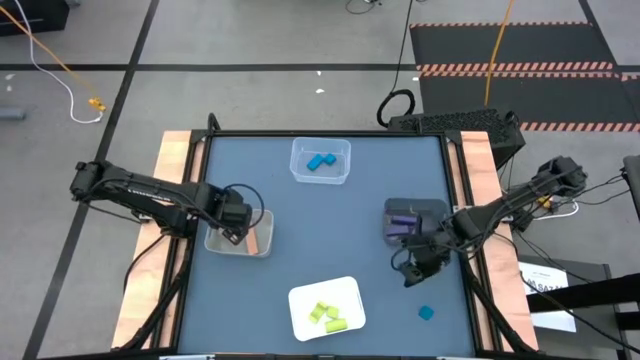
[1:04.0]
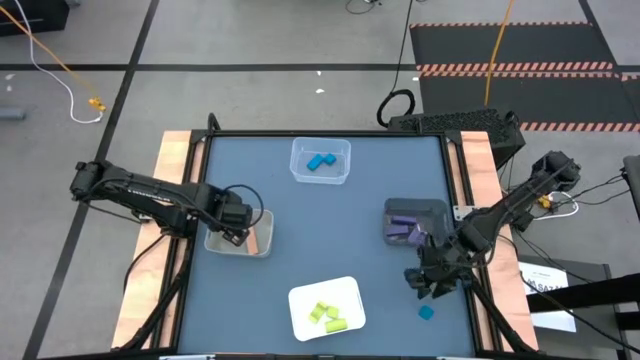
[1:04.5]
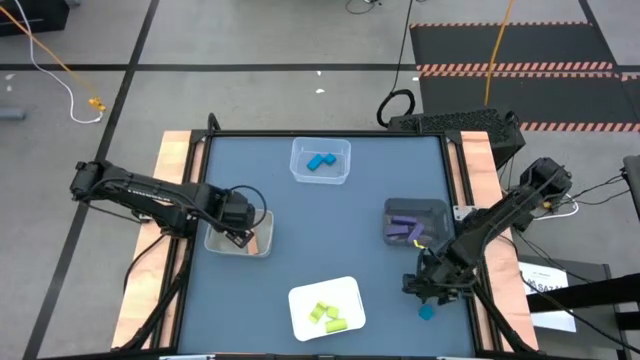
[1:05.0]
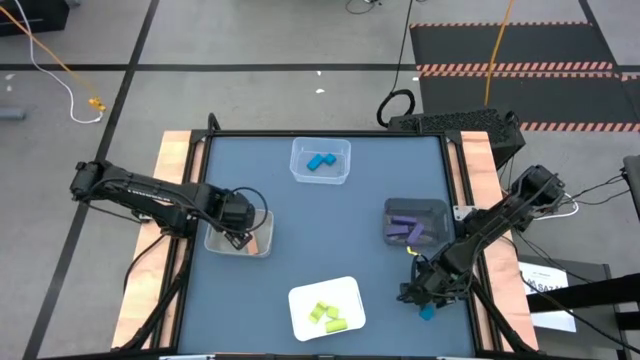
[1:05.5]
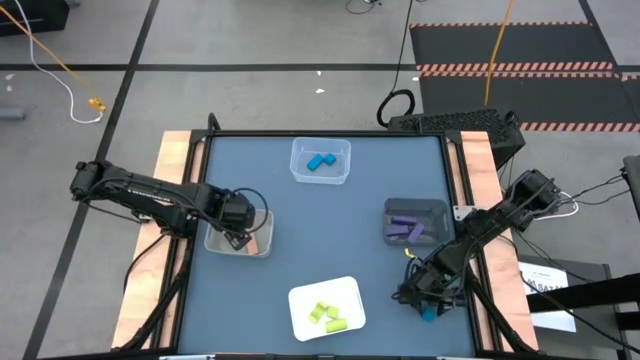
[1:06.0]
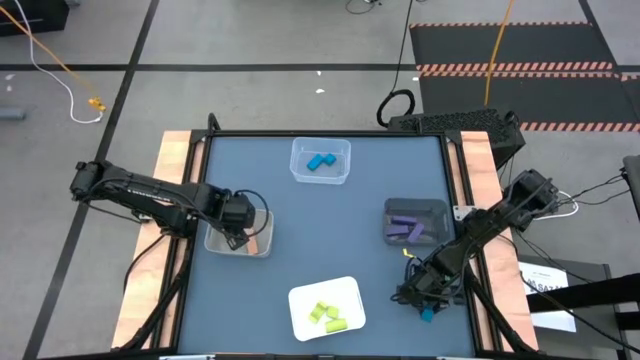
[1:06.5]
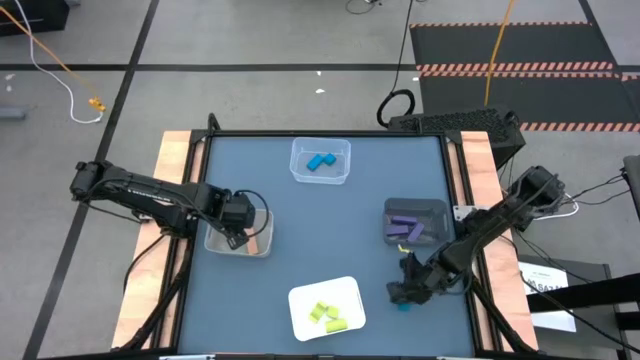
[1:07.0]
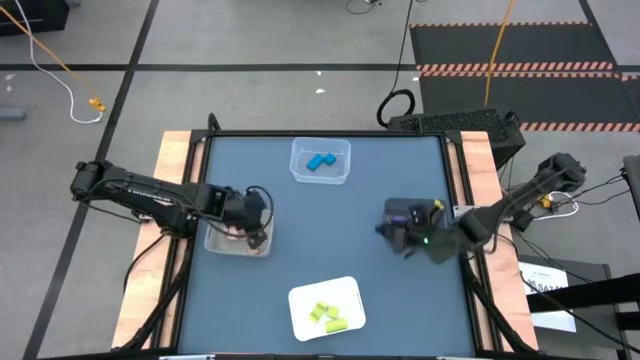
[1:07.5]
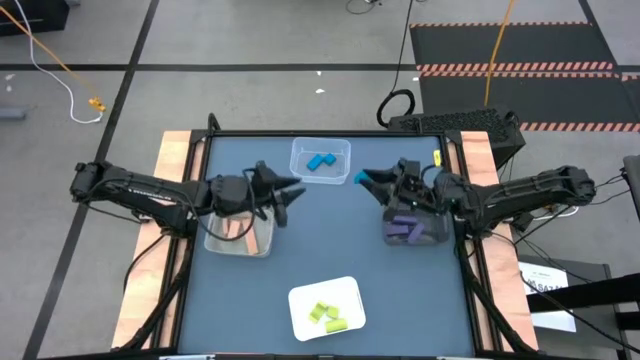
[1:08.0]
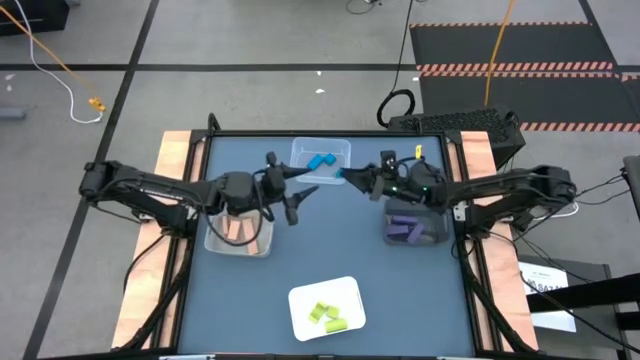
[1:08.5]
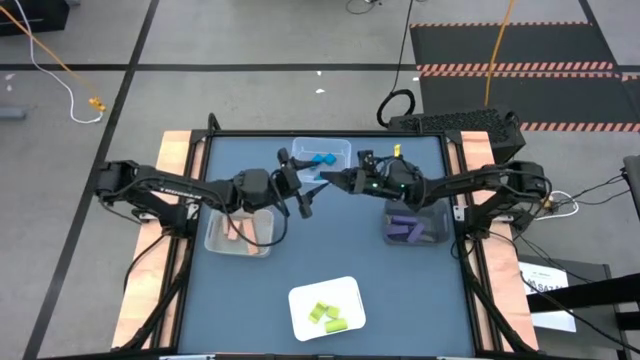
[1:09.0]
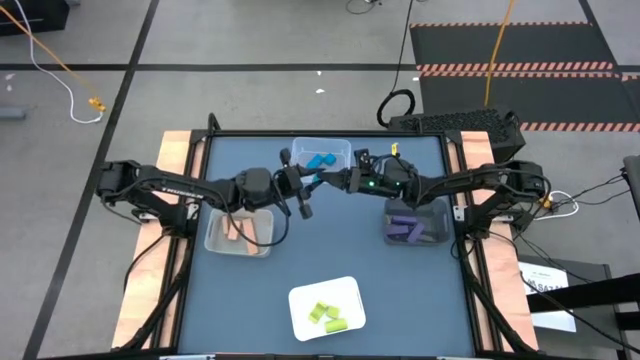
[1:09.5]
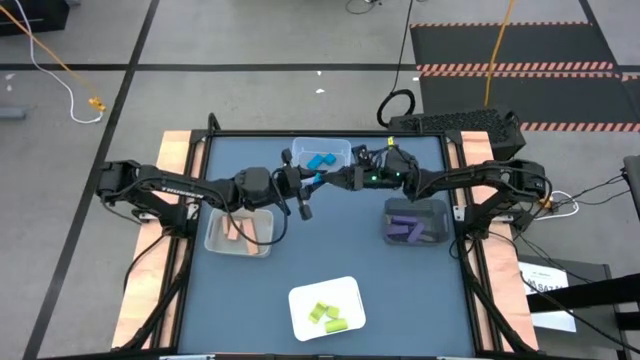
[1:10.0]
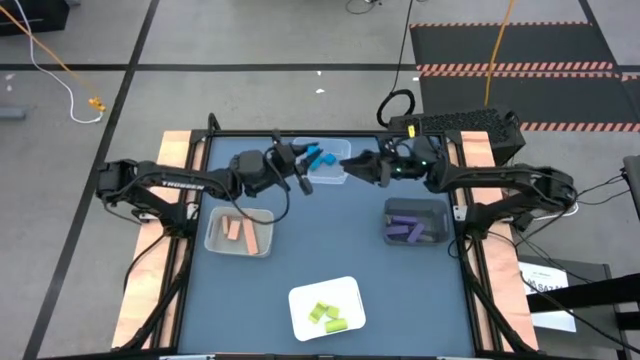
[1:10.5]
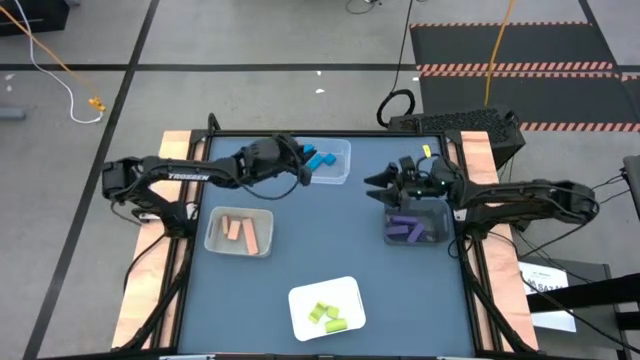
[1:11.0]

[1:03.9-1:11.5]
Task: Sort & place blocks by color
Put the blue block into the transparent bin

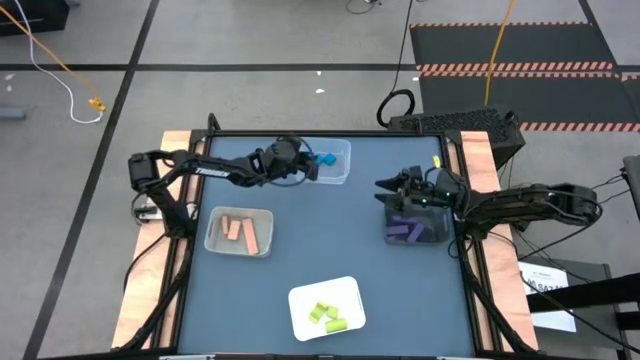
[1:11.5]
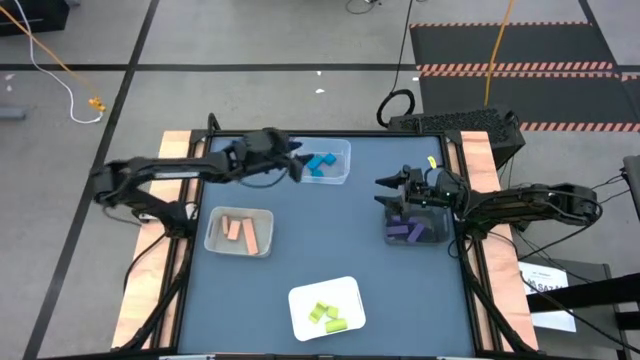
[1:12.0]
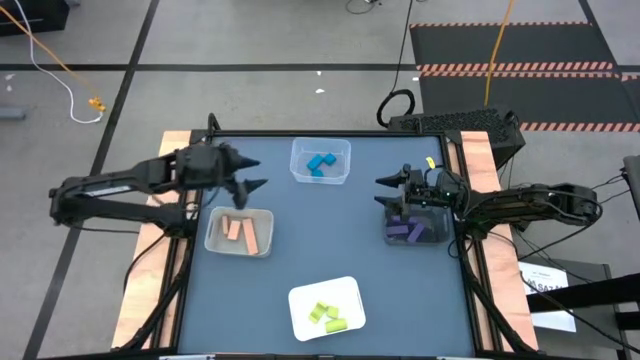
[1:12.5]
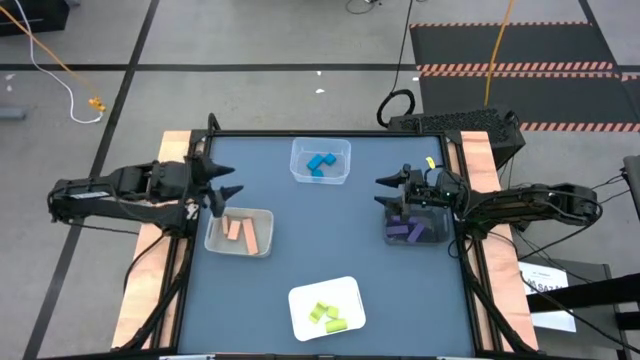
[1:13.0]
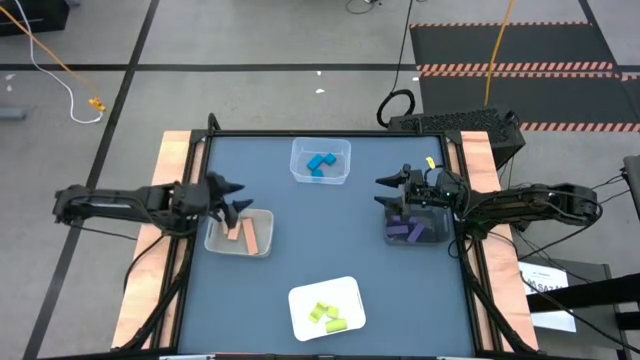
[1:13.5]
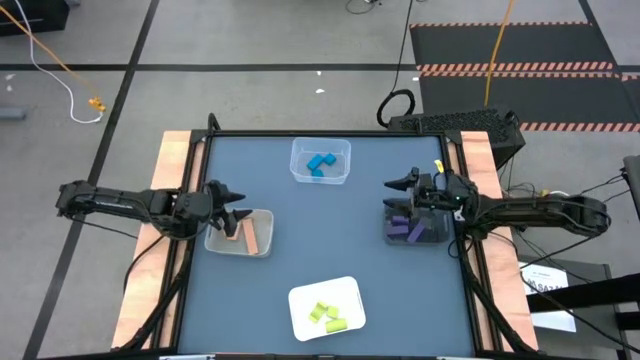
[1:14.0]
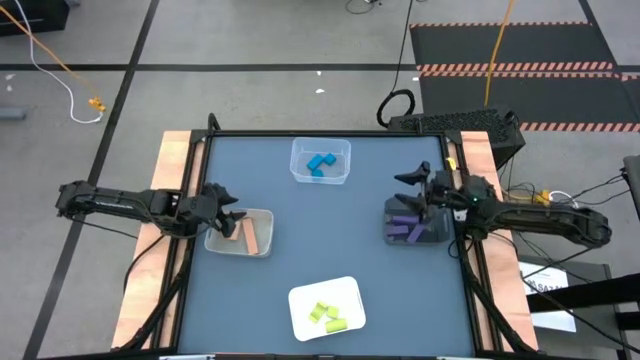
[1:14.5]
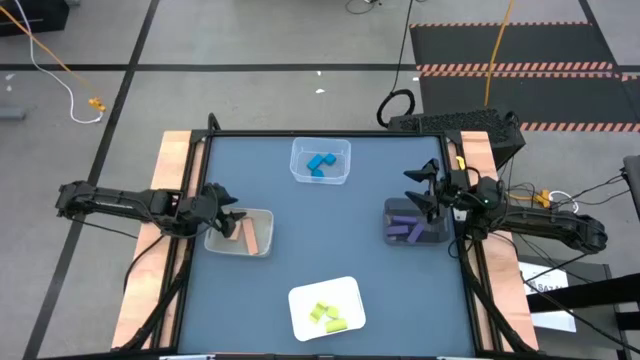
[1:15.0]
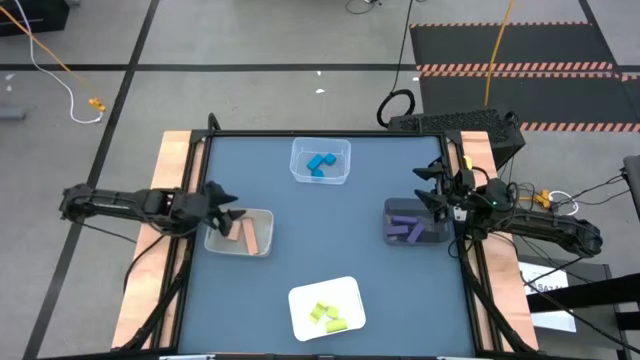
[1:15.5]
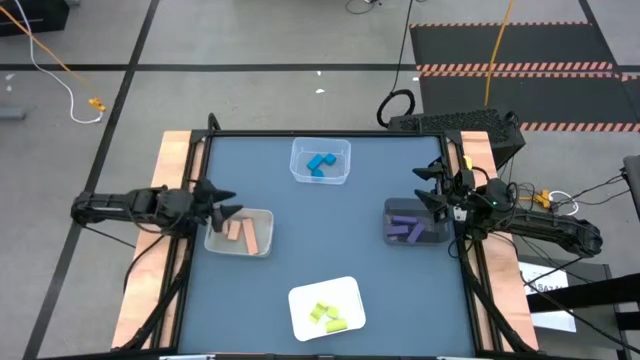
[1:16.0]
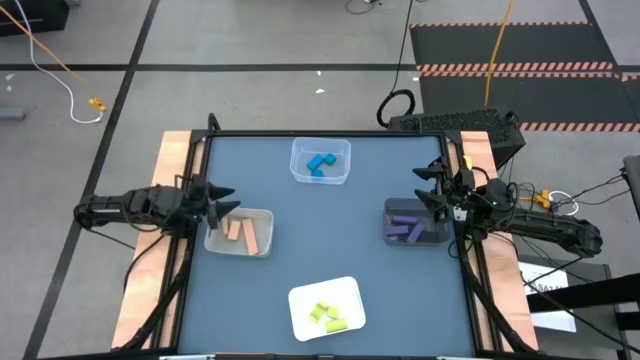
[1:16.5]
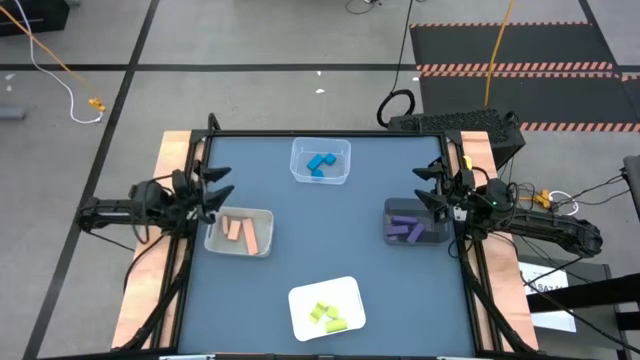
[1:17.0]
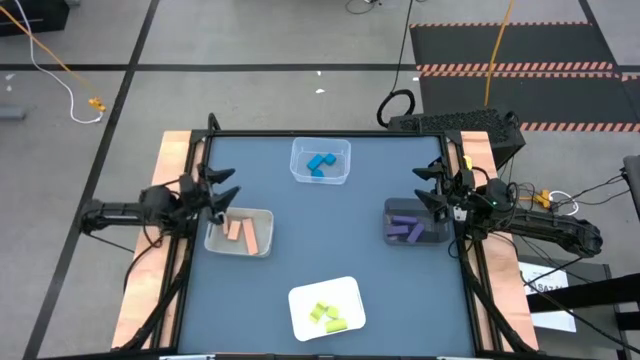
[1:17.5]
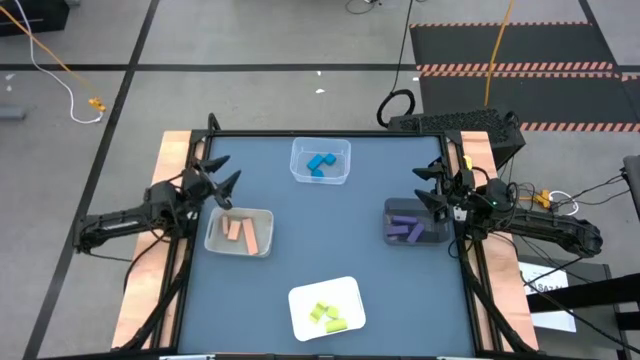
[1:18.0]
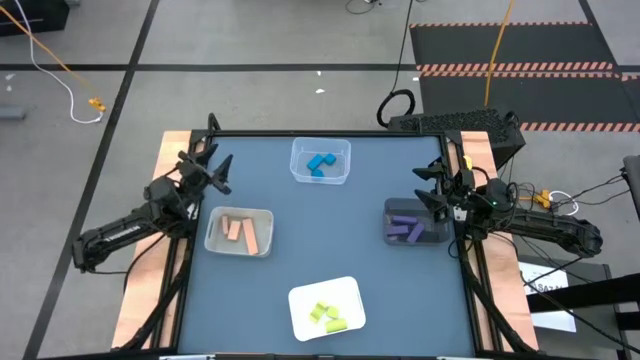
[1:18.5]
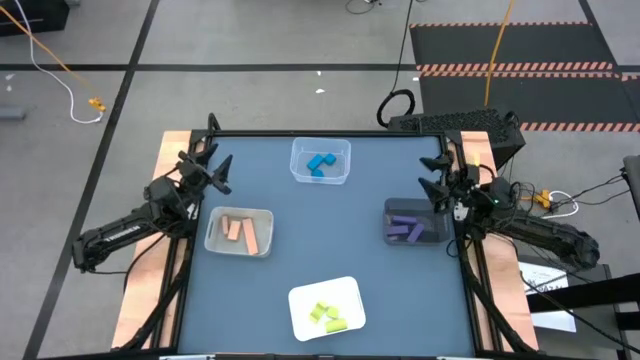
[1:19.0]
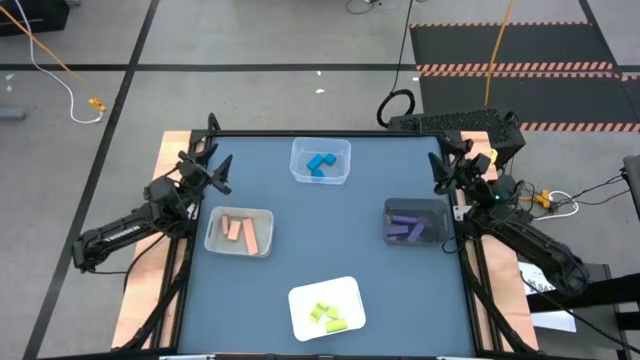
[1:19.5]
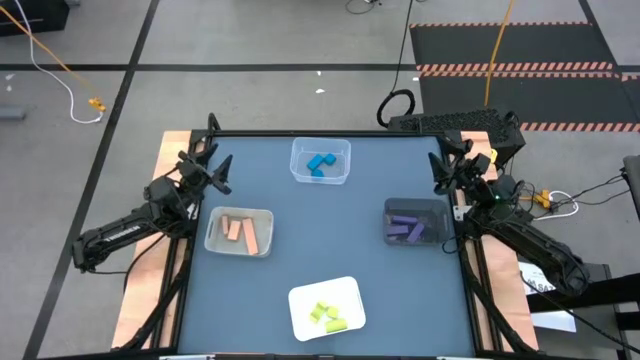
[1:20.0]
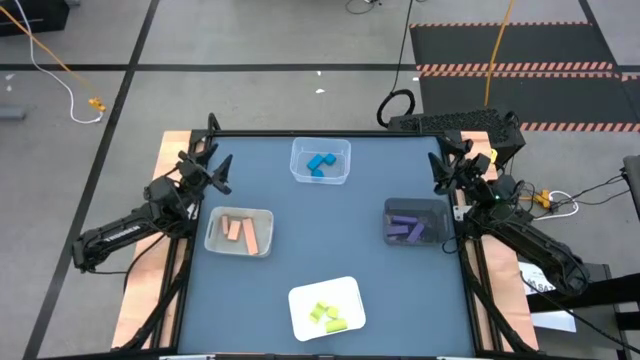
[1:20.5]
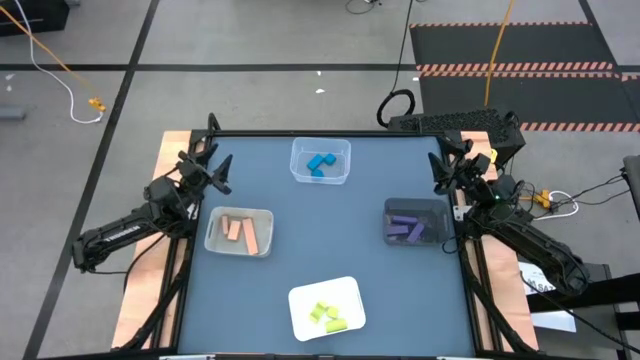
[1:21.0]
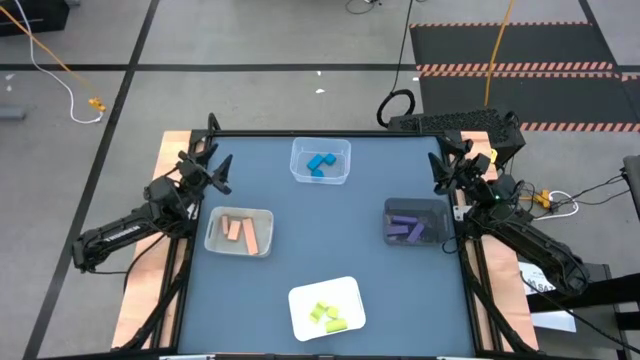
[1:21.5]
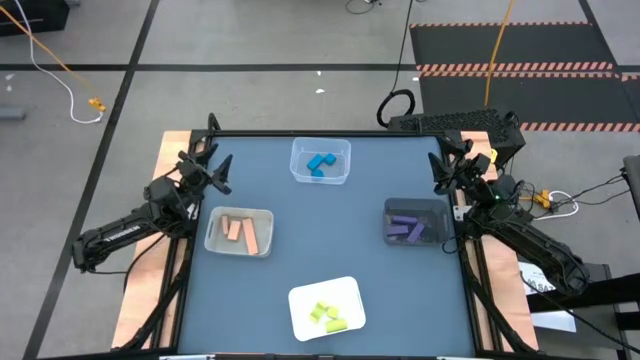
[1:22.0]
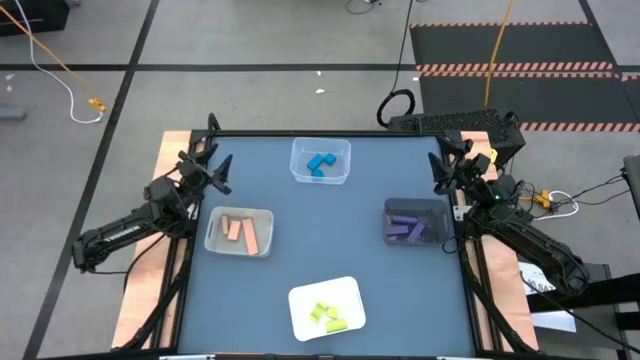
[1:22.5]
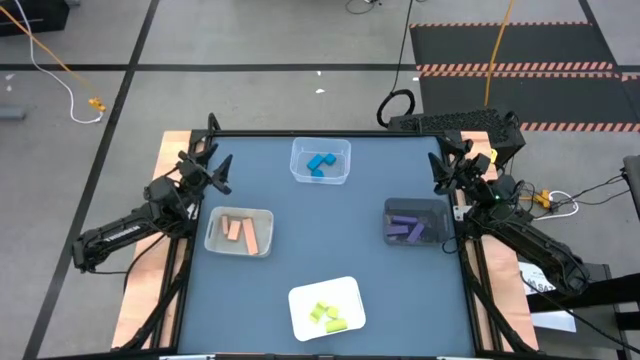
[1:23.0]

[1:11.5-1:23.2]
Return to Home Position

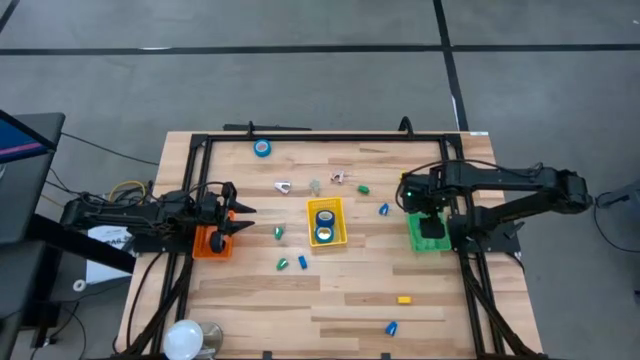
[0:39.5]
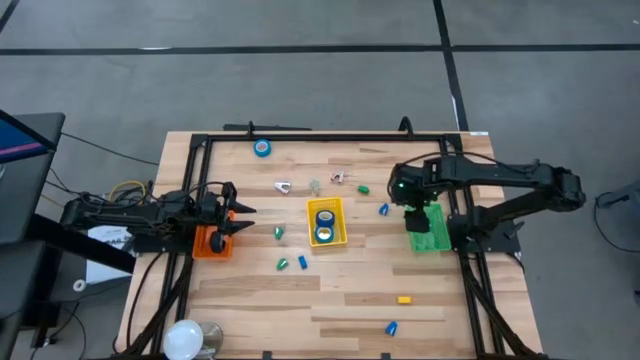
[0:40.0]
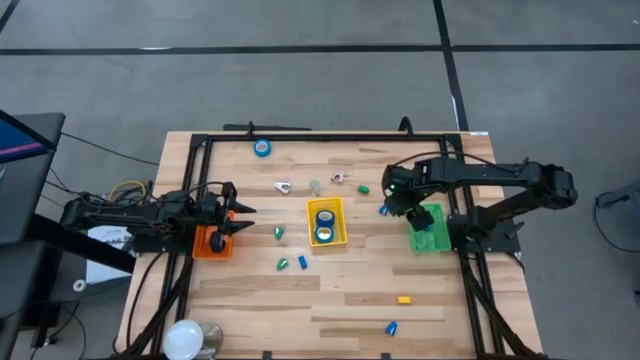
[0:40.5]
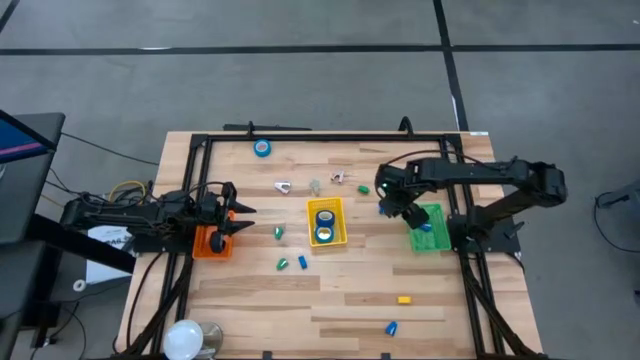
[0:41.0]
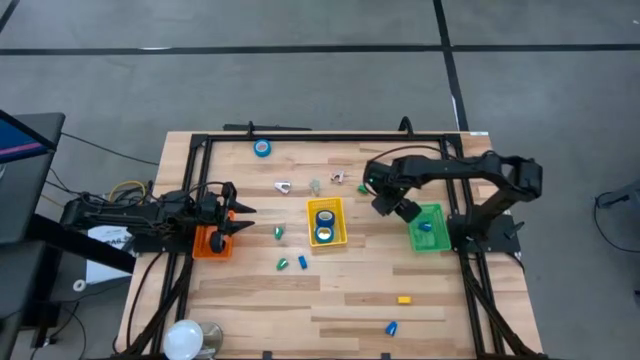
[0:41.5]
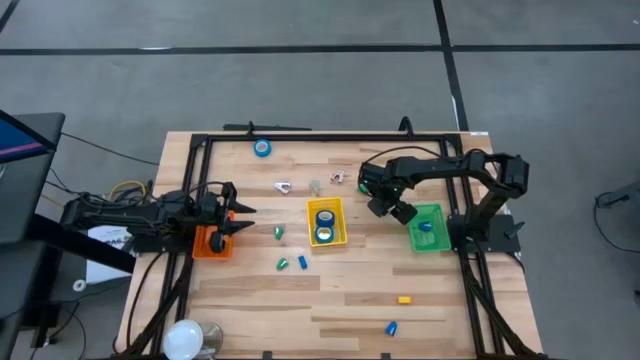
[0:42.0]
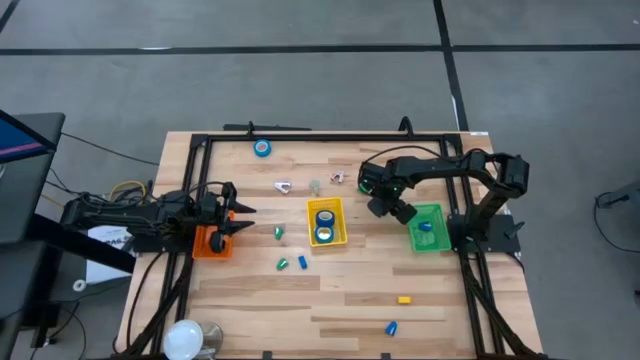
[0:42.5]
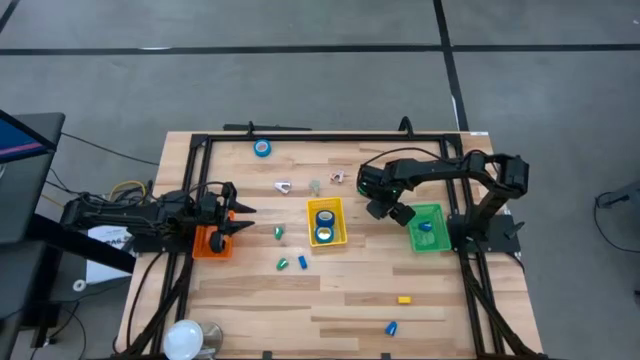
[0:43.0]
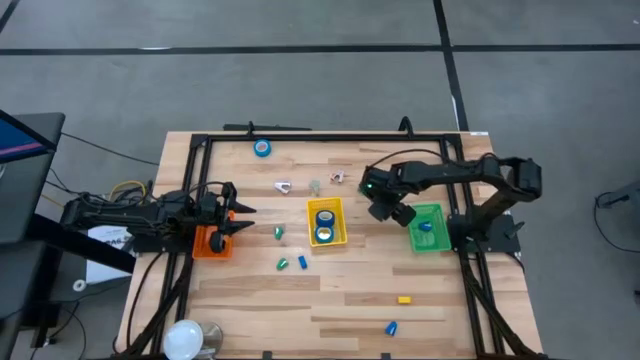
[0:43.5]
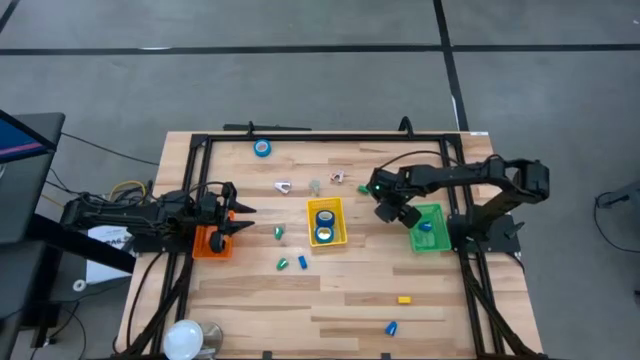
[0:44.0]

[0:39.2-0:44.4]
Task: Pick and place Stapler, Stapler remover, tape
Put the blue stapler into the green basket
